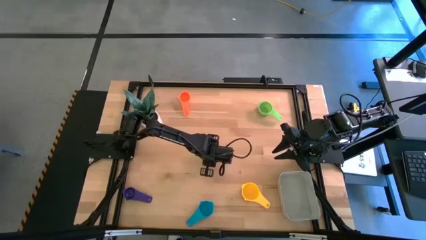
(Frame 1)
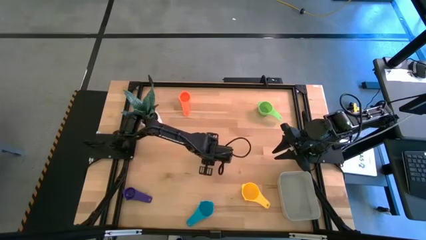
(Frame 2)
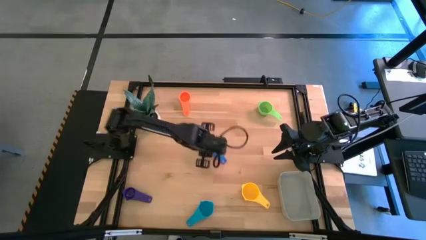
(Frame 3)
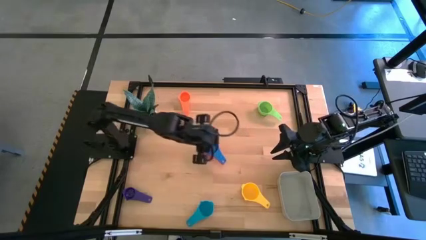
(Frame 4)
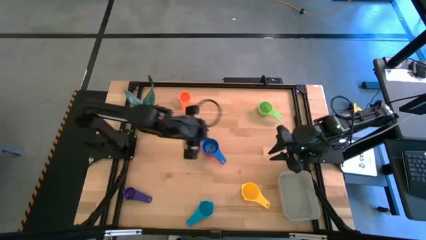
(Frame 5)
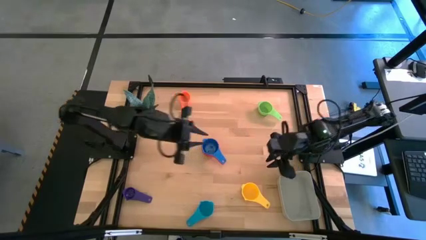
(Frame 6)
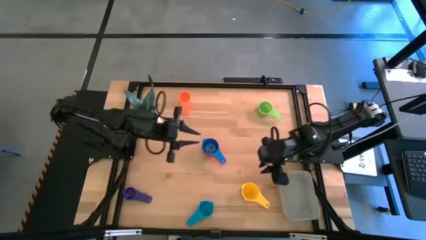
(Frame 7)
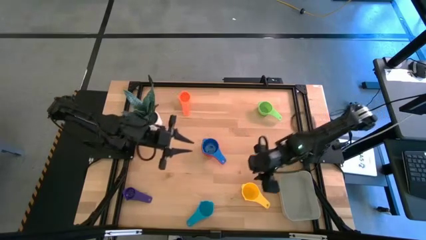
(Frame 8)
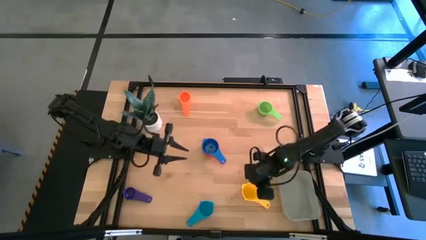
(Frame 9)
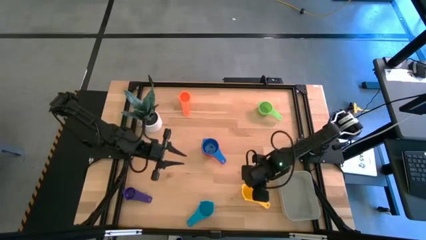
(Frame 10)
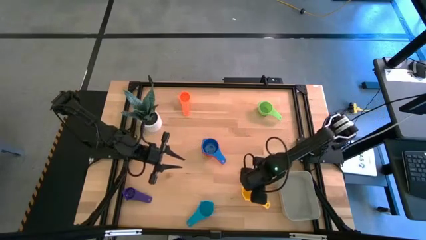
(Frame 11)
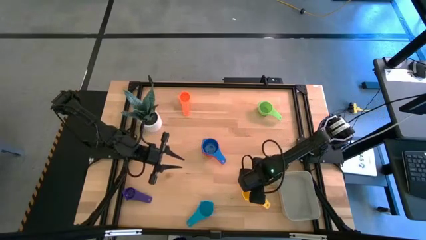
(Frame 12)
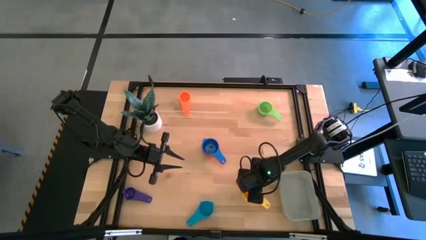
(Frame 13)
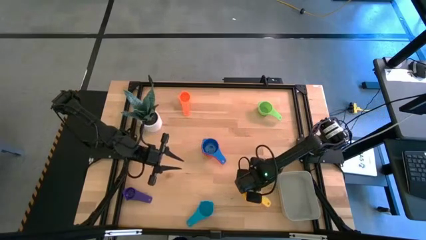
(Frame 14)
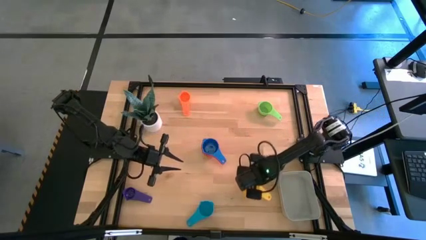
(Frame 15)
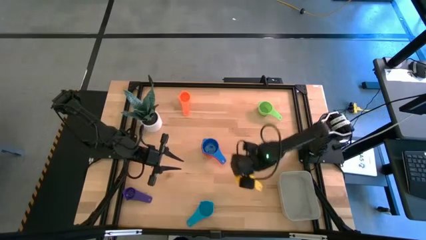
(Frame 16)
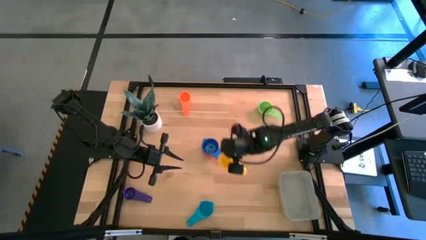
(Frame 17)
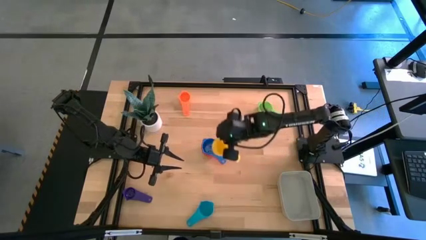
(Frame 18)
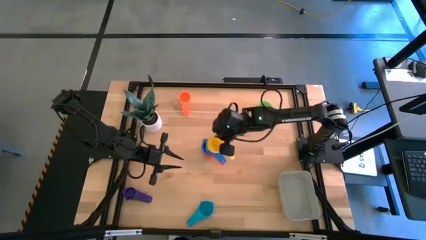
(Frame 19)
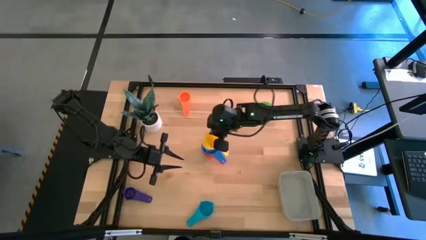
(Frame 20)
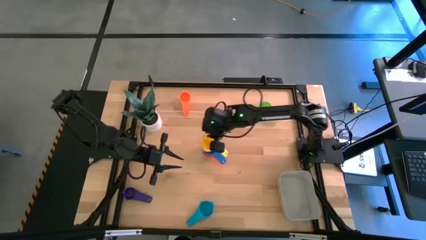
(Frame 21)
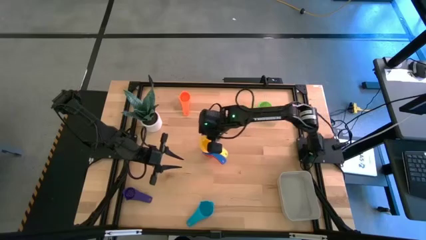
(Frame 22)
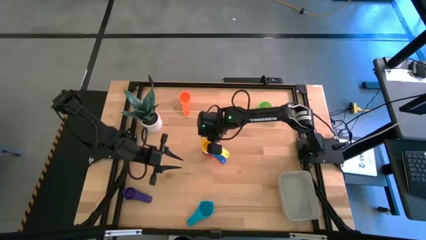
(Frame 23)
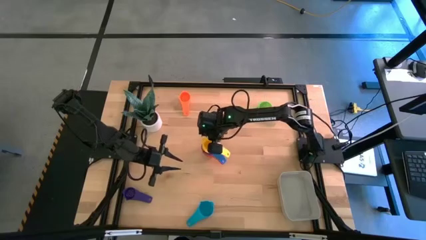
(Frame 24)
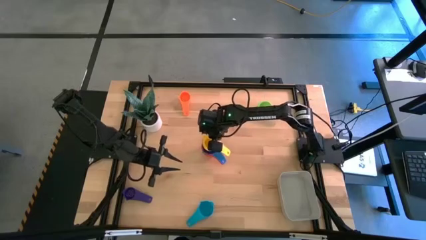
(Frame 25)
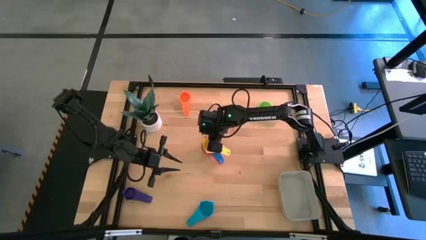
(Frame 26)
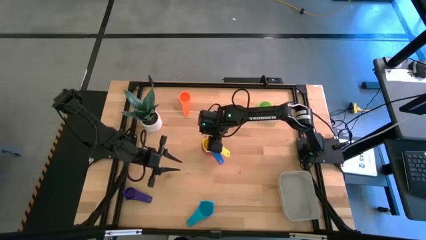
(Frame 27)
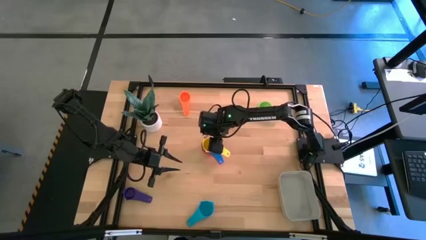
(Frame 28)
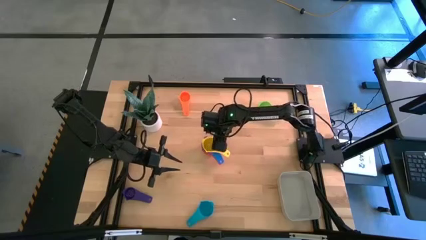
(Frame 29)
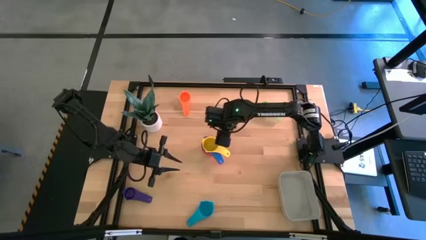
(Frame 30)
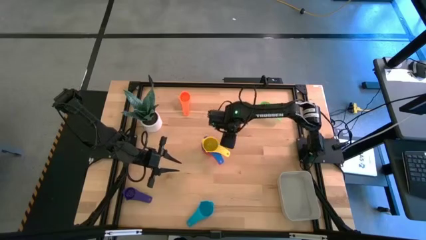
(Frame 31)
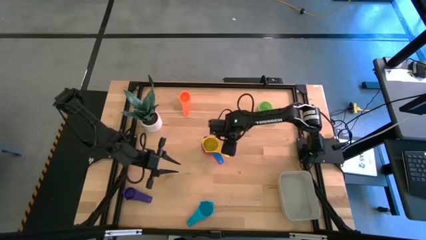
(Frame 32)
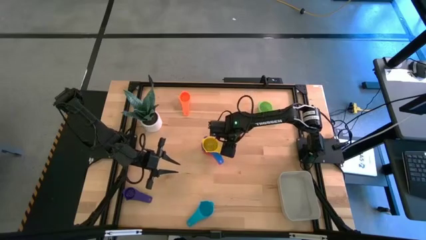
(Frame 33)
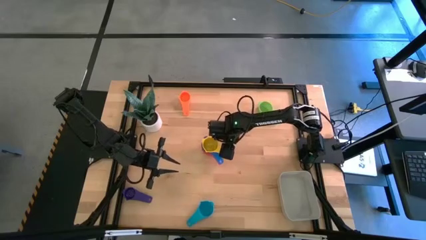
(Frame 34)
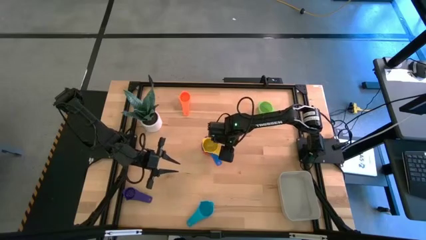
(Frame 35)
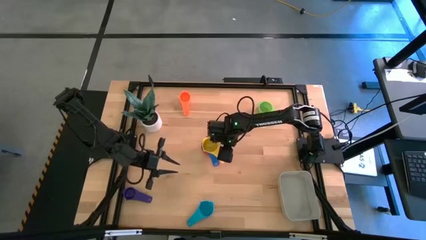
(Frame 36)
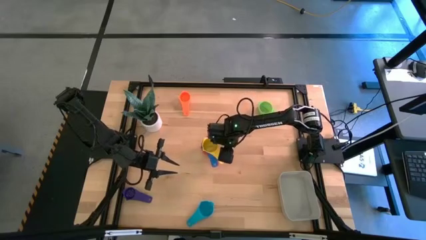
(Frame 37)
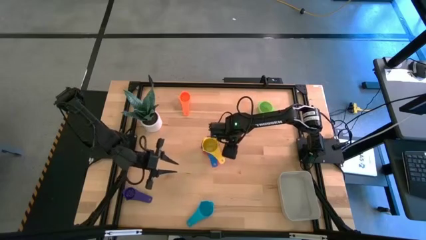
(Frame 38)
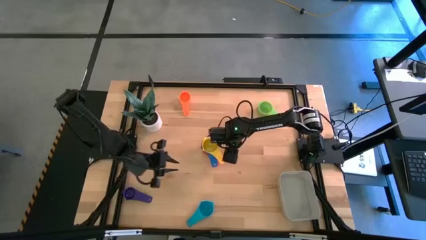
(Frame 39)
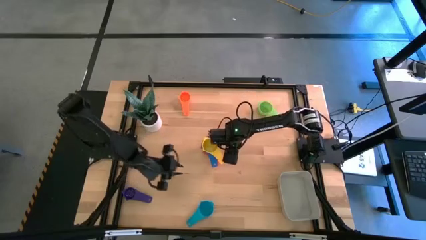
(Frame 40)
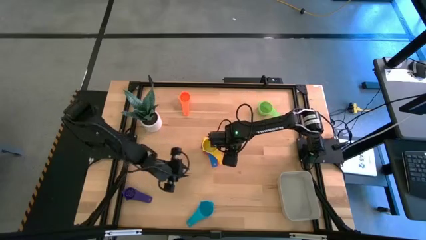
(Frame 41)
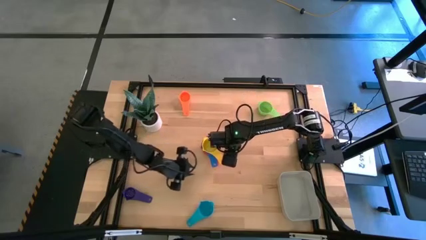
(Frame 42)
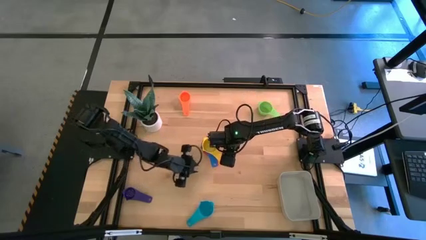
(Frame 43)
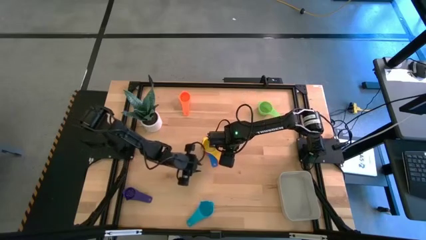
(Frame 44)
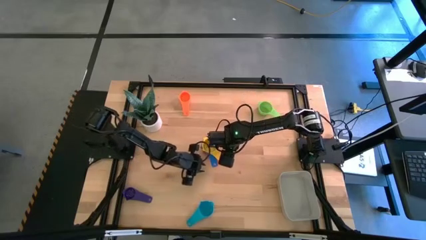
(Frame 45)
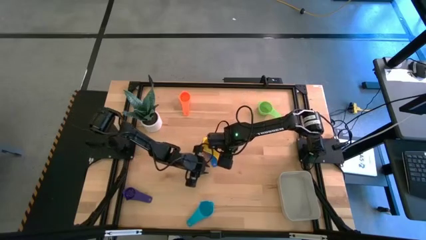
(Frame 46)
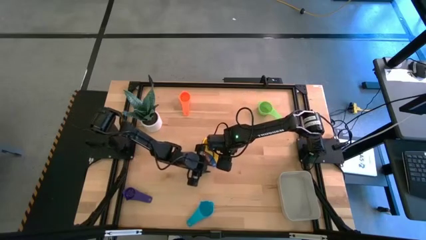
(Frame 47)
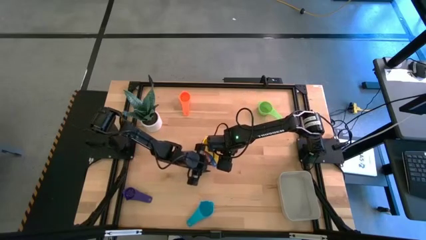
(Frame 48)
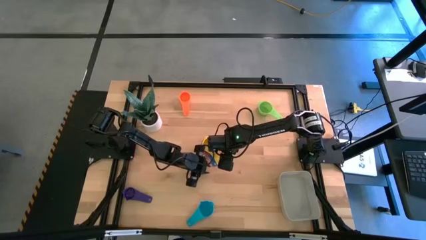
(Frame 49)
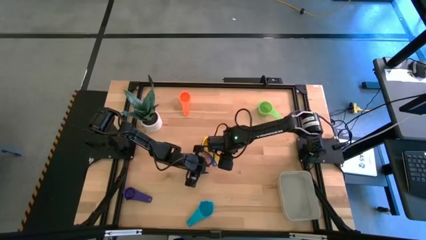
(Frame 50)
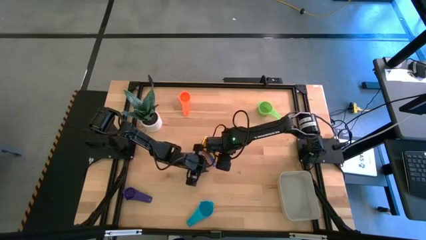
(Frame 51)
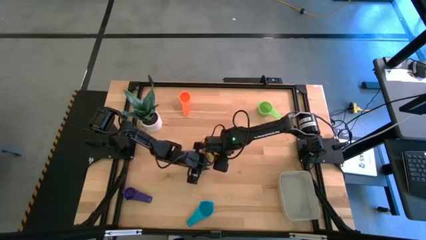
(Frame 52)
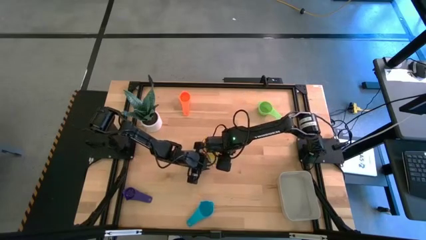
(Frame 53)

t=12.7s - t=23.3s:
Task: Nest measuring cups in basket
Stack the yellow measuring cup on top of the dark blue measuring cup

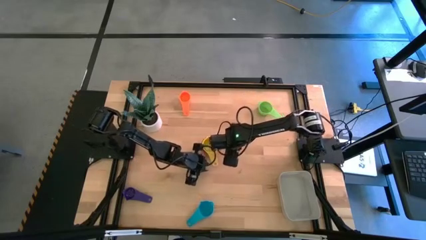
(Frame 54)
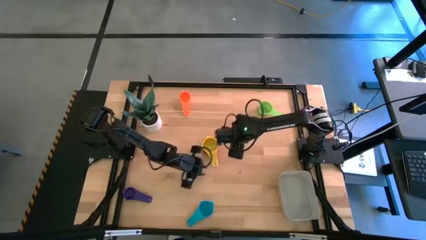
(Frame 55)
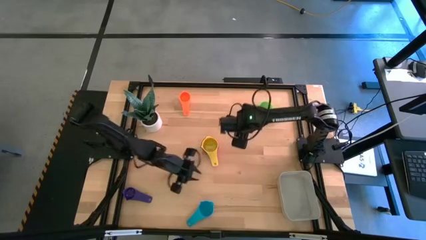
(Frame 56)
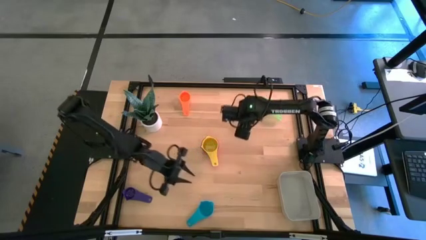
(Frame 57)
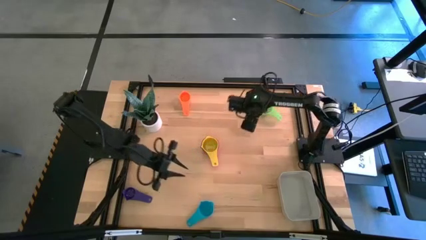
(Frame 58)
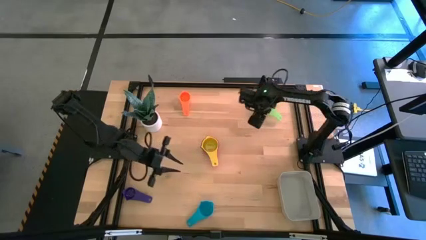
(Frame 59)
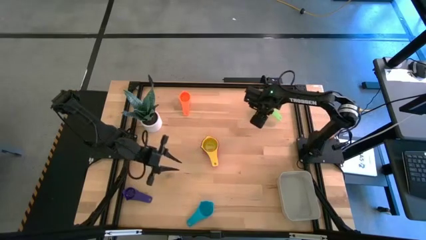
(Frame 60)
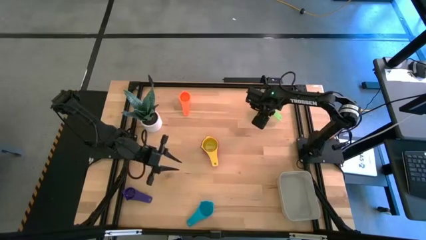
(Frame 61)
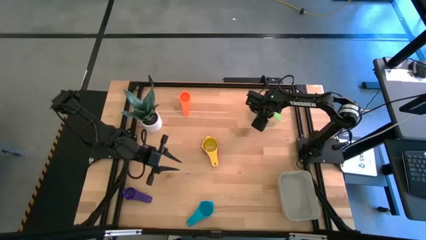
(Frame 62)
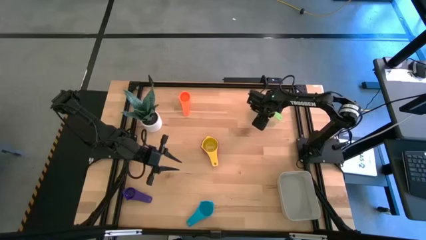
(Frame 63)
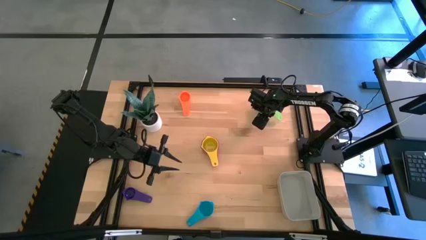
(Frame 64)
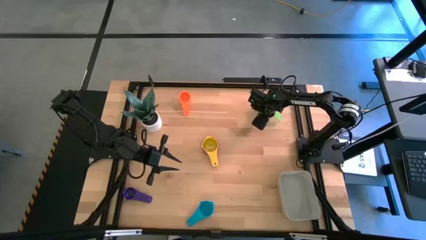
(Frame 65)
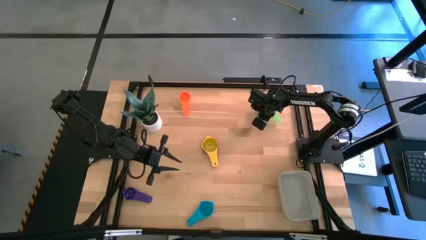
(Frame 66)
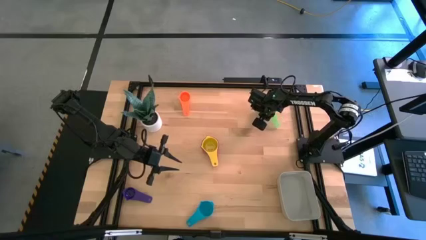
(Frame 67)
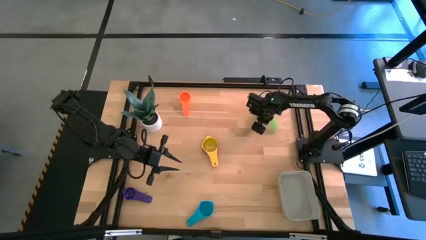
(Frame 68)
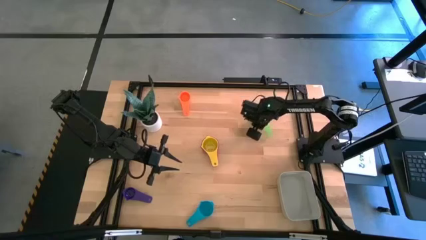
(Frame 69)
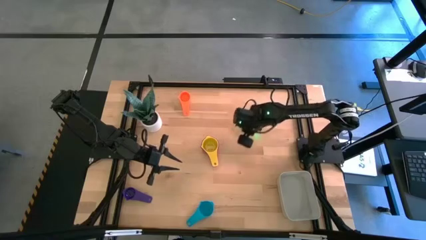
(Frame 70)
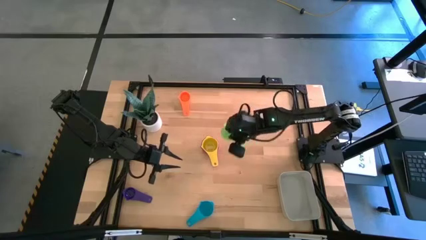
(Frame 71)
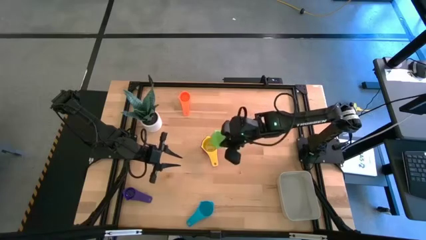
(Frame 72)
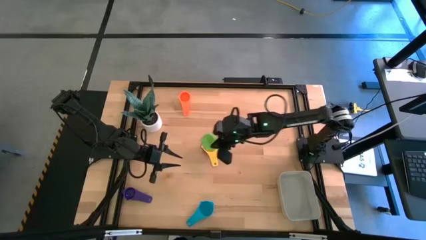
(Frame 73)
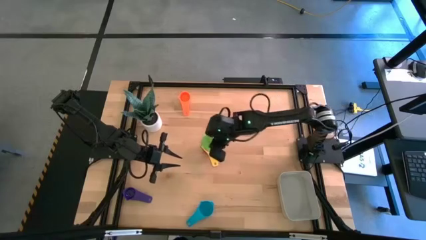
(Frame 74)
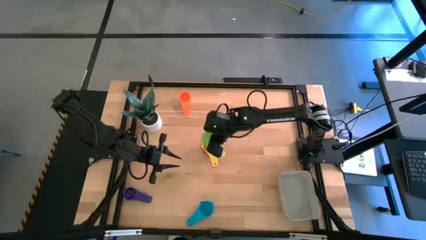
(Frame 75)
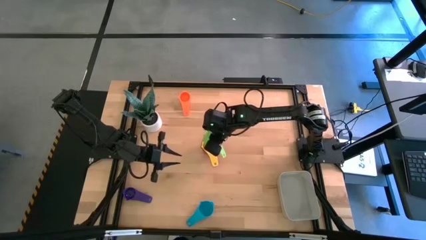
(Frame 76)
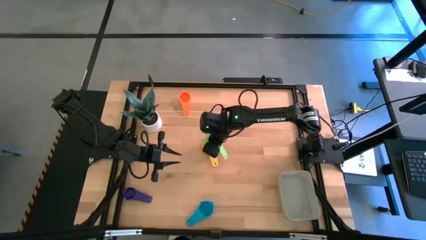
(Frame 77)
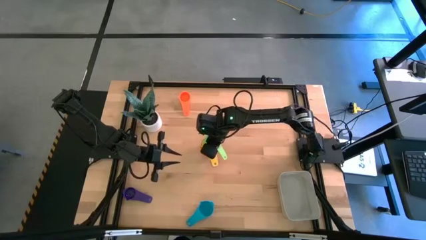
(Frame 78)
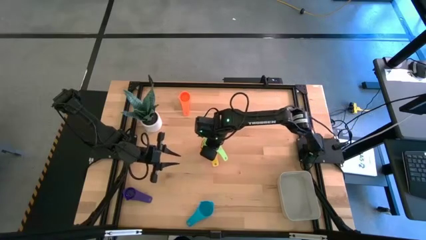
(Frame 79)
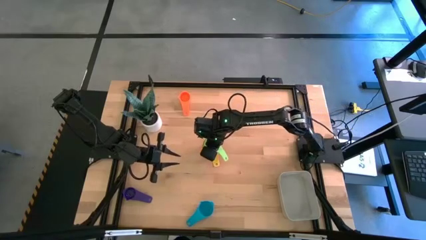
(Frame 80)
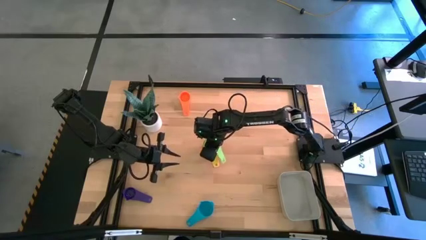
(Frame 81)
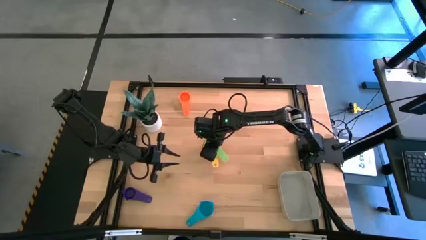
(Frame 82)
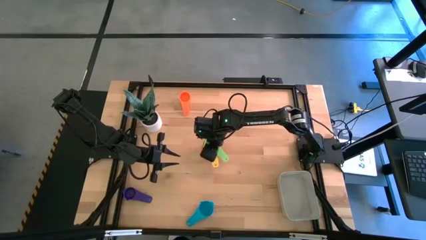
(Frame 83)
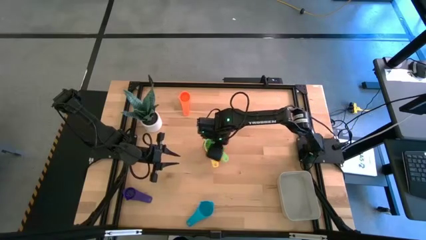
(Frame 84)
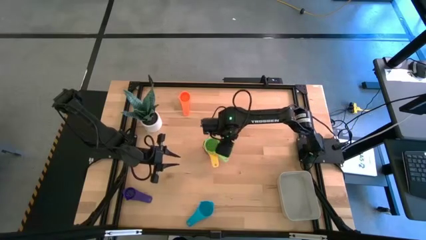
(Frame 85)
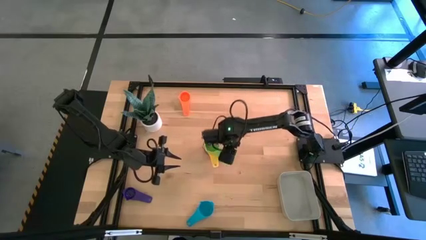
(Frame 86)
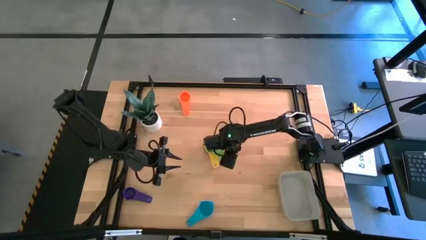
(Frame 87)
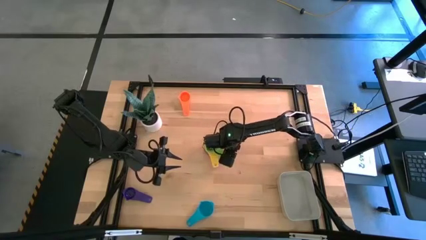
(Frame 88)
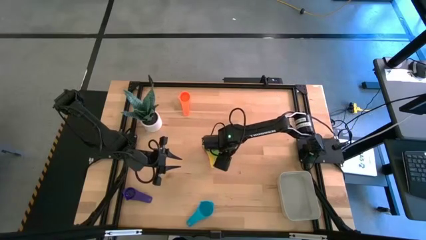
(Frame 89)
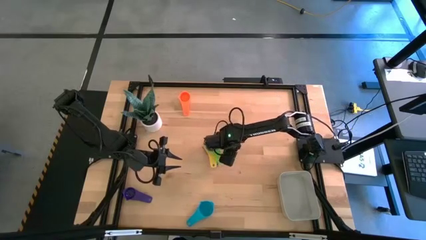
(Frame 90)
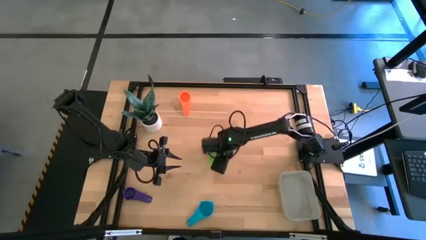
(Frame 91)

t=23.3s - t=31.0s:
Stack the green measuring cup on top of the yellow measuring cup
